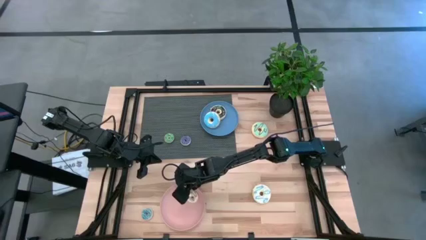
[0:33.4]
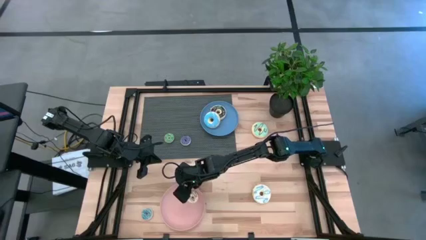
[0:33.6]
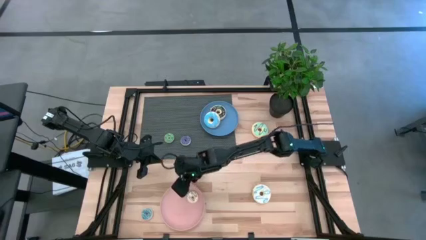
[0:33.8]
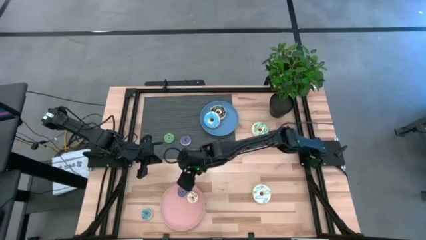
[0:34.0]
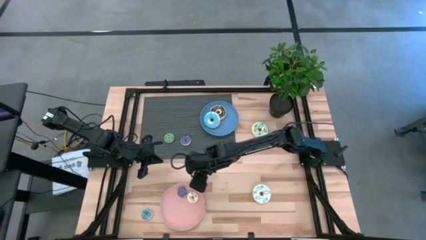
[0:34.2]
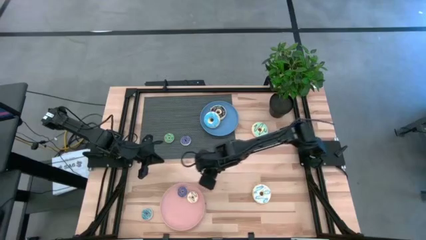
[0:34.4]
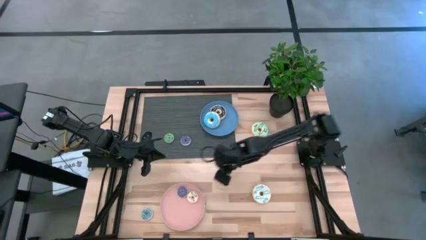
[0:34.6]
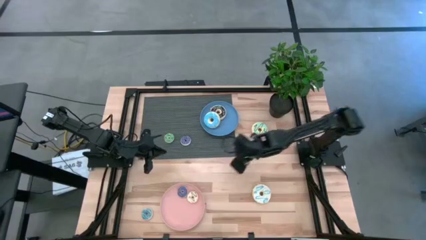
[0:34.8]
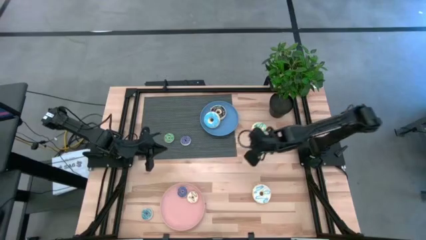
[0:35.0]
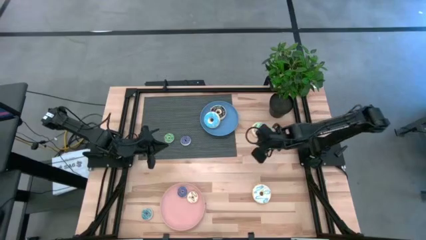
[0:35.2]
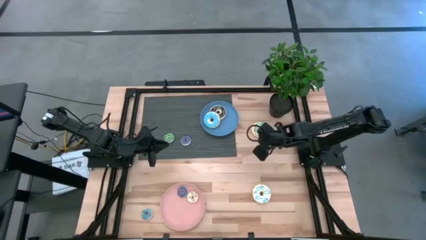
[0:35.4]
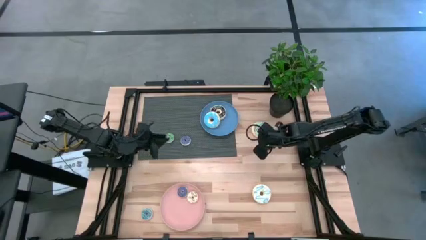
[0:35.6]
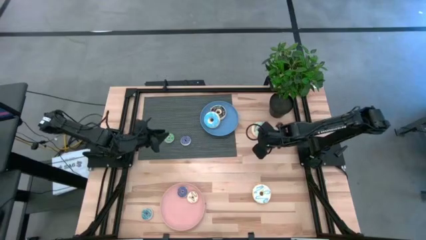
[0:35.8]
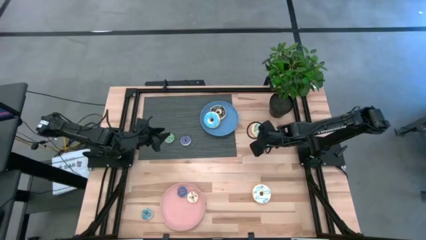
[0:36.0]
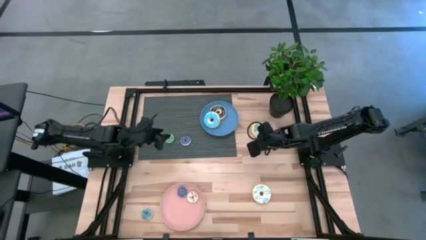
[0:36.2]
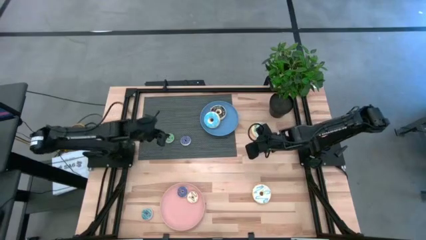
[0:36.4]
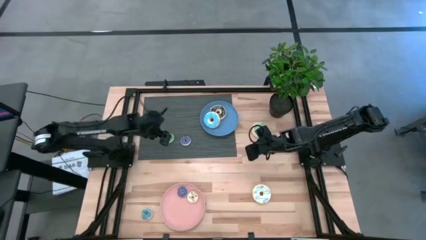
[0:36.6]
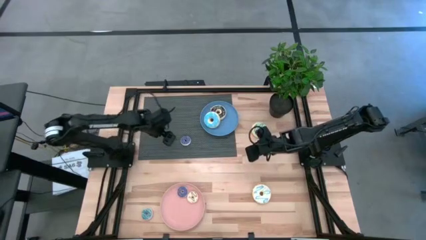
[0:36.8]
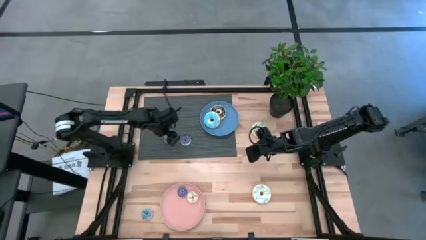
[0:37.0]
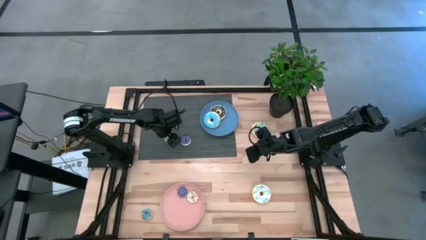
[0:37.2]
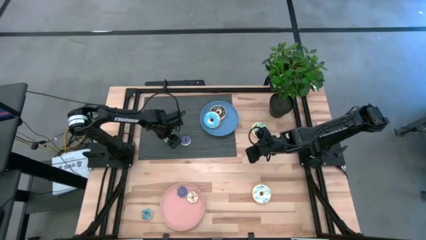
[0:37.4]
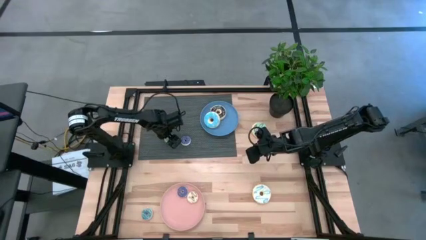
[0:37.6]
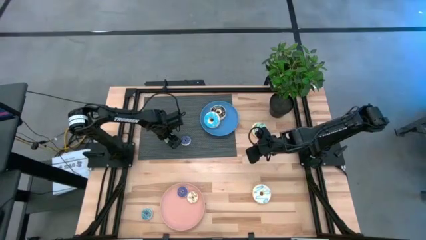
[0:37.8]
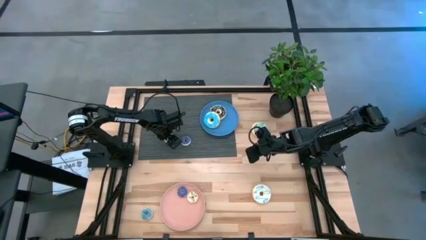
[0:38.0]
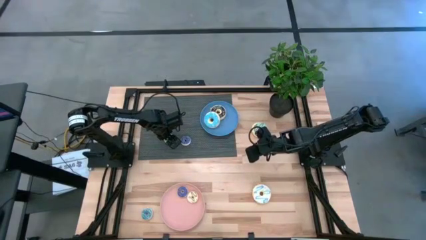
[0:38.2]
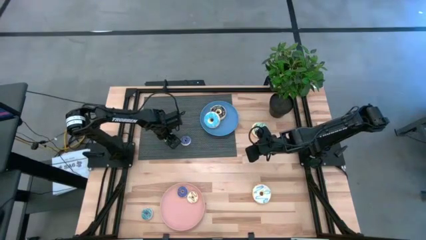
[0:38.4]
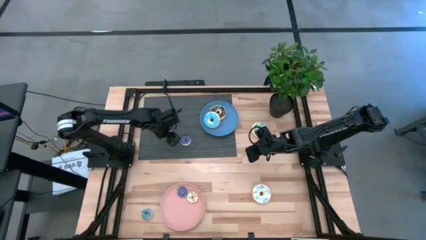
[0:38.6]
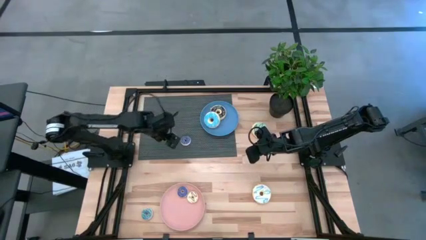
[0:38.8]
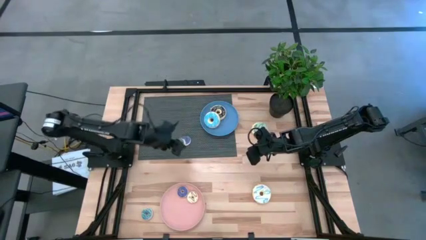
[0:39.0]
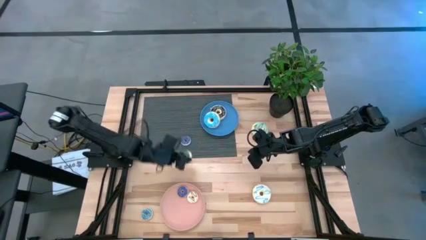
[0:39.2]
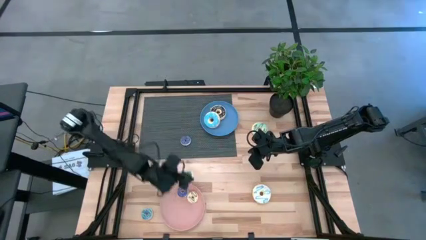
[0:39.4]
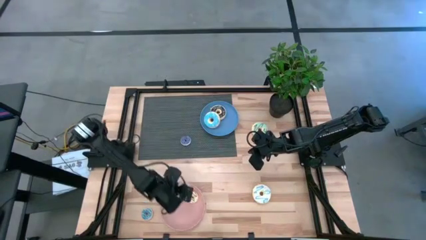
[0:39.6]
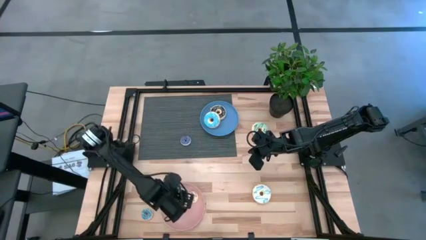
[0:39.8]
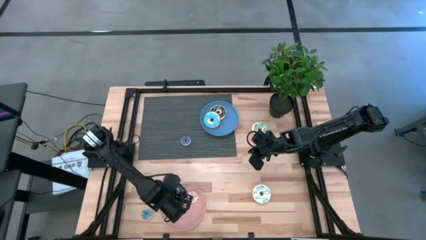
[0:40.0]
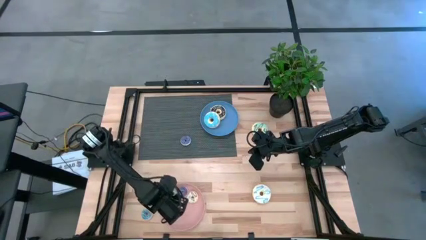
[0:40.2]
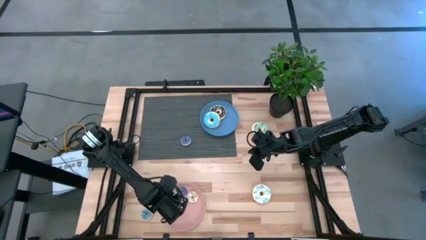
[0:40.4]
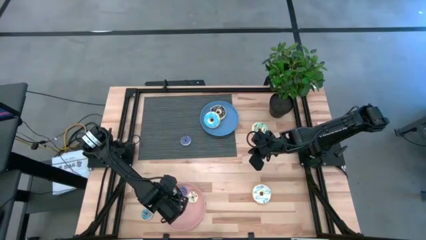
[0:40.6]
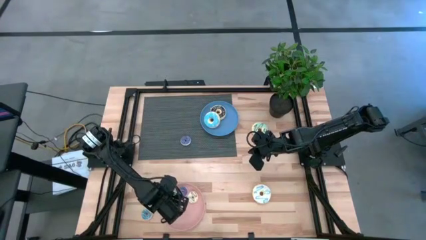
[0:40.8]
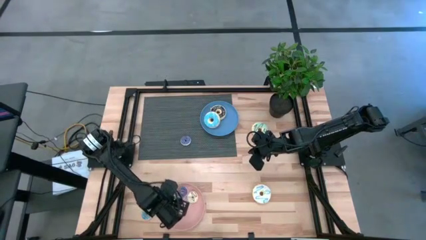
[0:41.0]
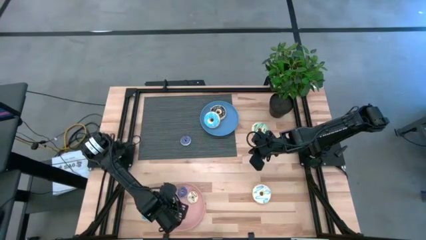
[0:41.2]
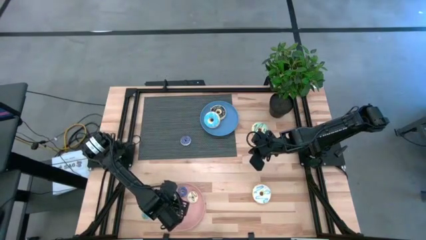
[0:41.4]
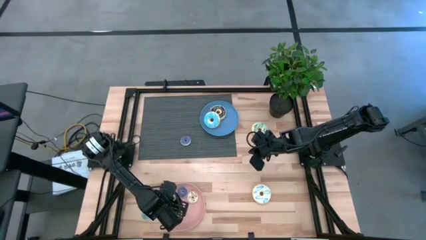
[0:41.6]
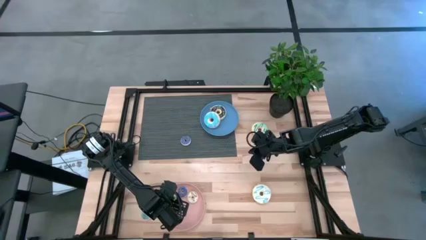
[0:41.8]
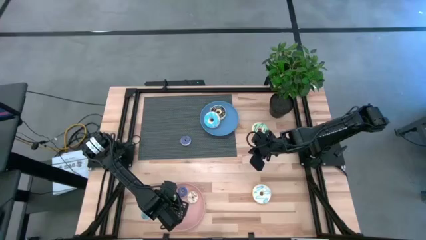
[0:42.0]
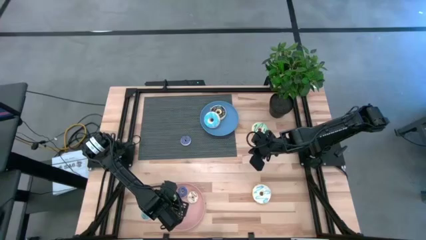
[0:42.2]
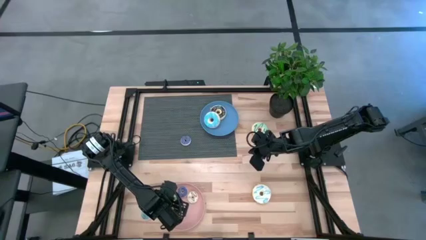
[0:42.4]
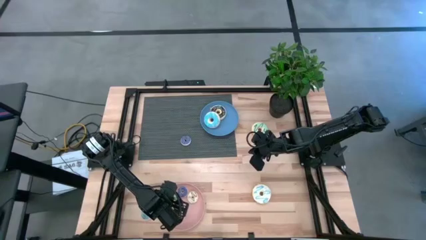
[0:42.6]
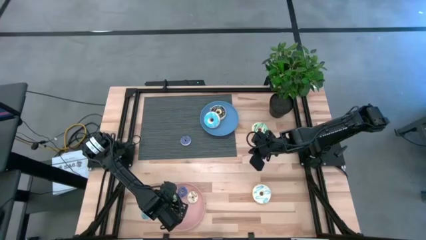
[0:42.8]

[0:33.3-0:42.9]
Task: Pick & Place donuts
Put the small green donut on the pink plate

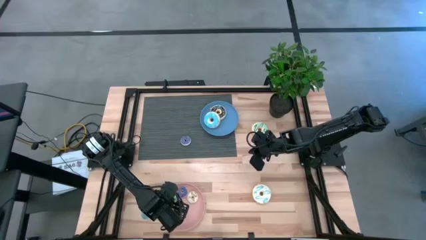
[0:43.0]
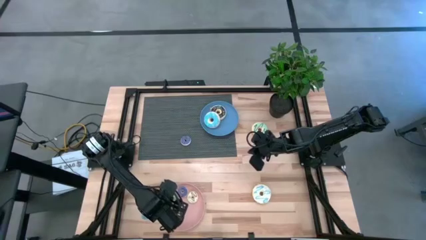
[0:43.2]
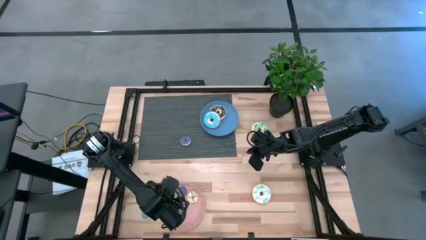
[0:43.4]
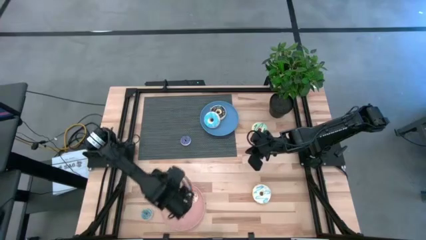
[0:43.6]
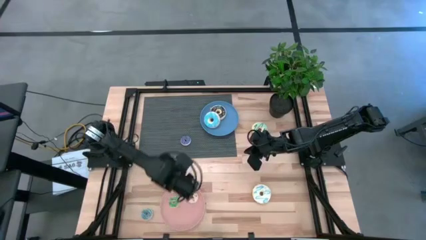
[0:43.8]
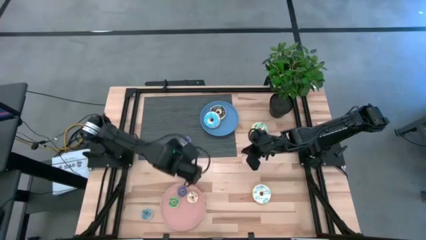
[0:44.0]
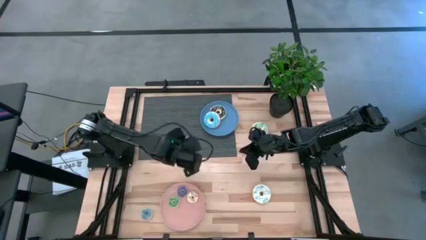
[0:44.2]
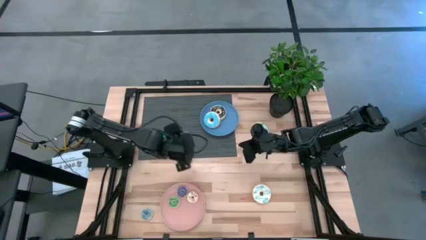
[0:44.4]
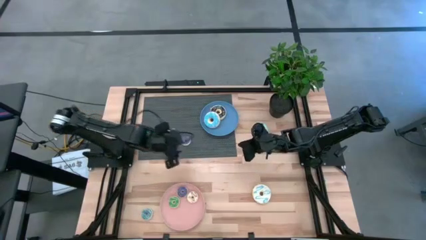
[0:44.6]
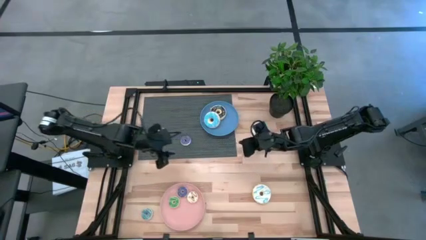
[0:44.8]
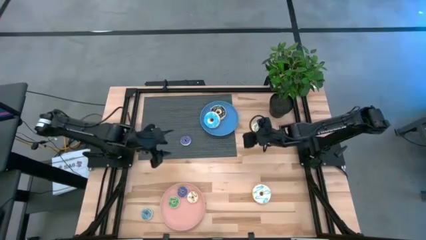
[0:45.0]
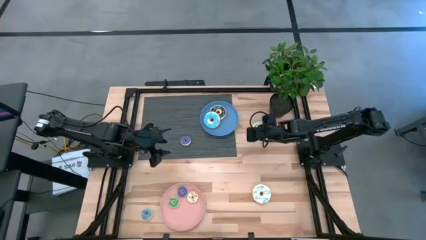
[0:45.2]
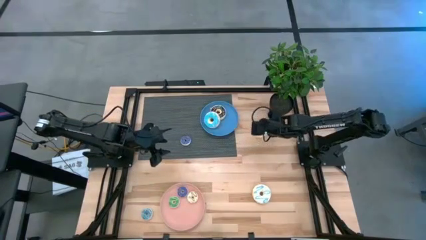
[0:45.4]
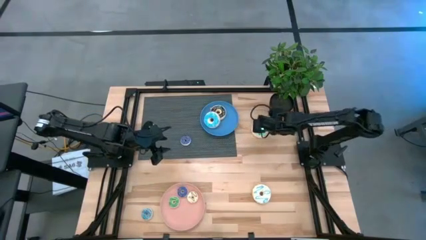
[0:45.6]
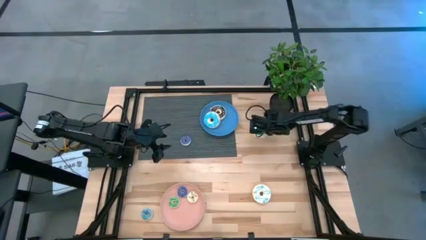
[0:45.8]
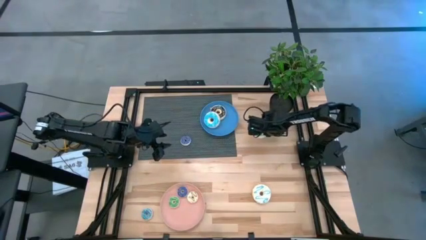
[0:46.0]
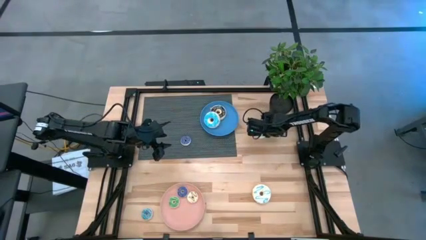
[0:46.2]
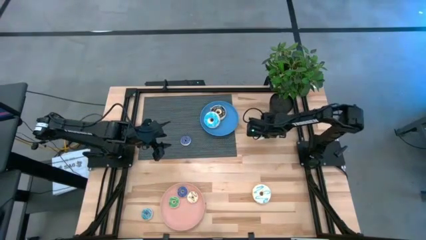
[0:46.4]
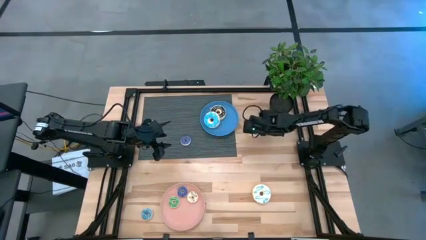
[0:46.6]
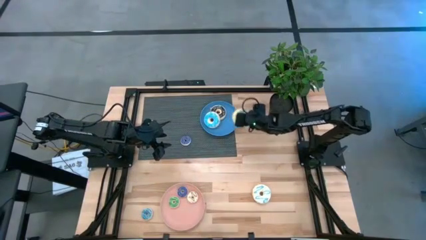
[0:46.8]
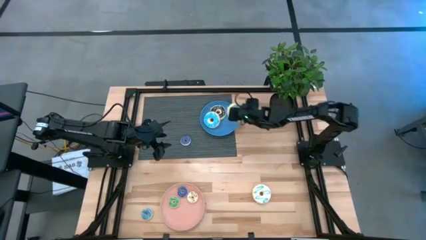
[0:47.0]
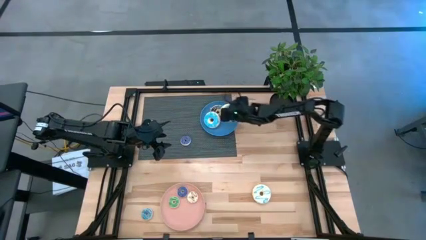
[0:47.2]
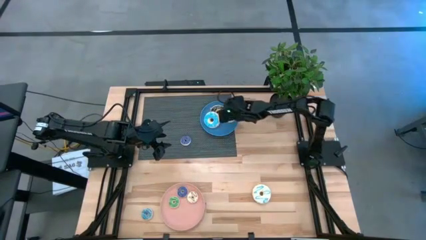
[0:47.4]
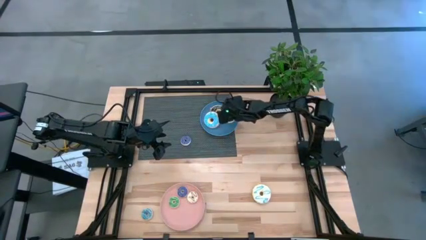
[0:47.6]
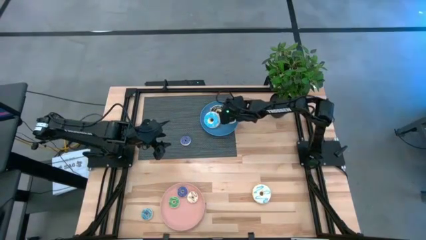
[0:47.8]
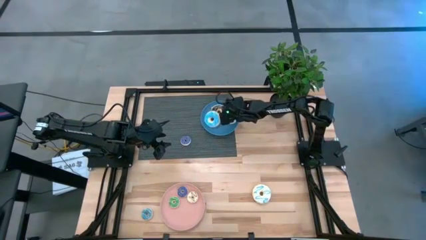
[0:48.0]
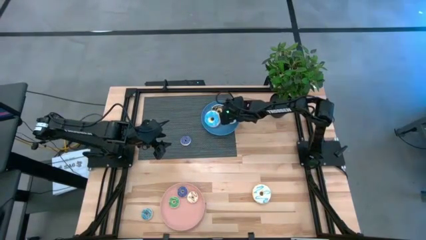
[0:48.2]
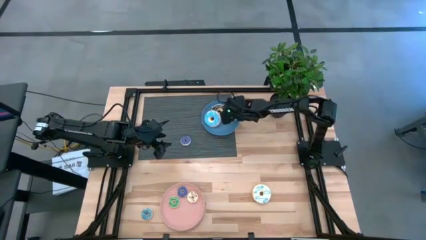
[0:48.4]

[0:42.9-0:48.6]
Put the large green donut on the blue plate
